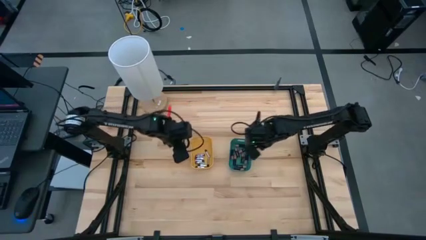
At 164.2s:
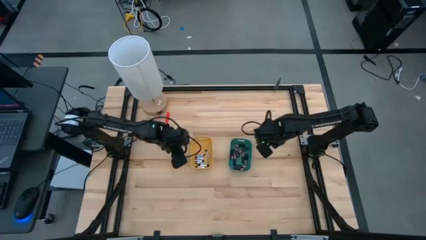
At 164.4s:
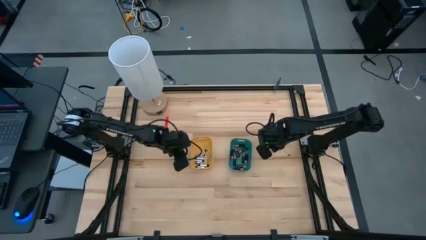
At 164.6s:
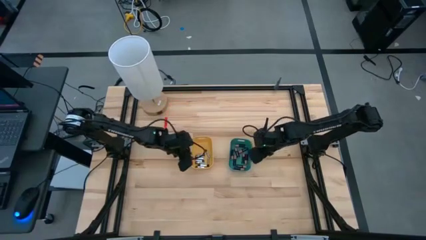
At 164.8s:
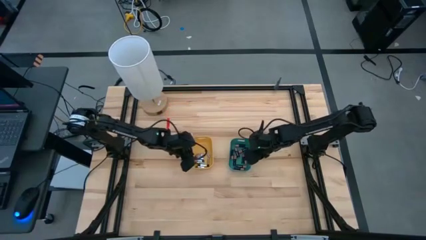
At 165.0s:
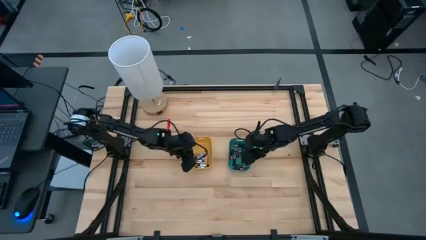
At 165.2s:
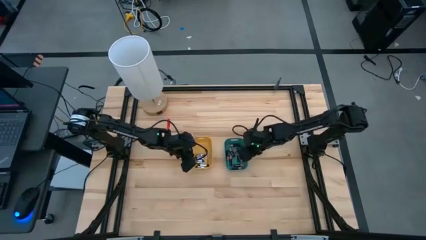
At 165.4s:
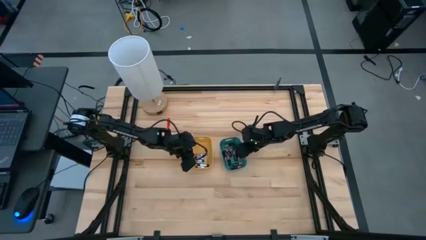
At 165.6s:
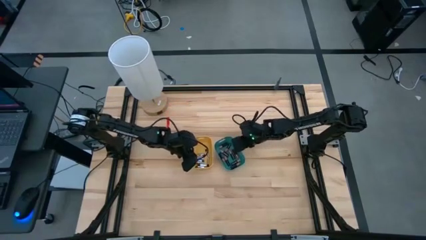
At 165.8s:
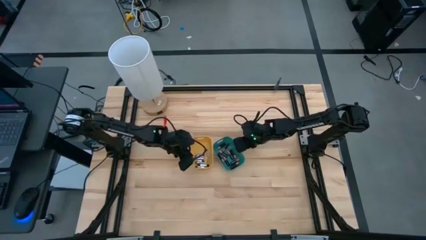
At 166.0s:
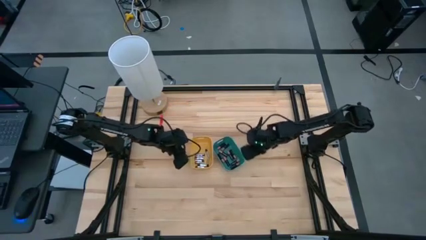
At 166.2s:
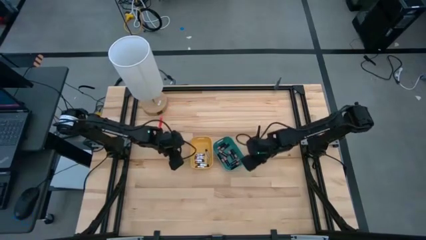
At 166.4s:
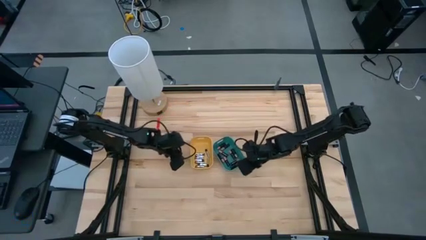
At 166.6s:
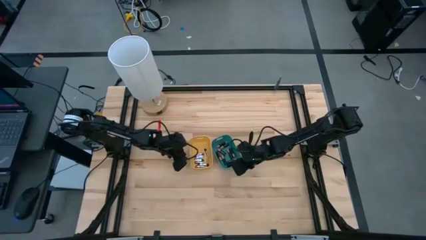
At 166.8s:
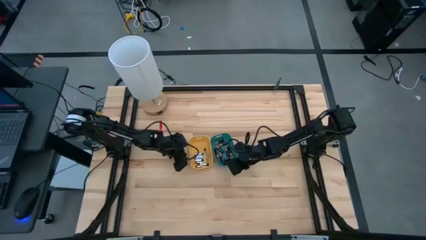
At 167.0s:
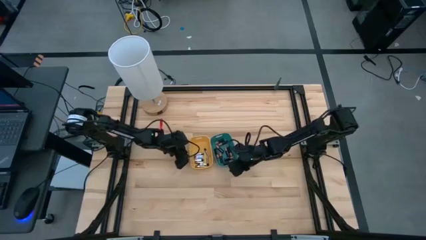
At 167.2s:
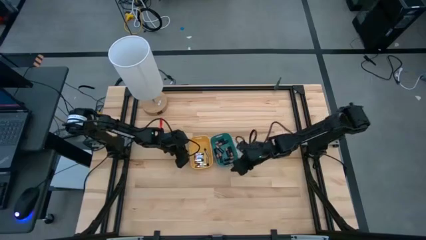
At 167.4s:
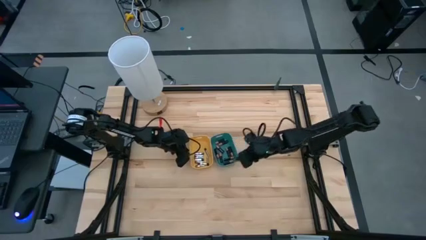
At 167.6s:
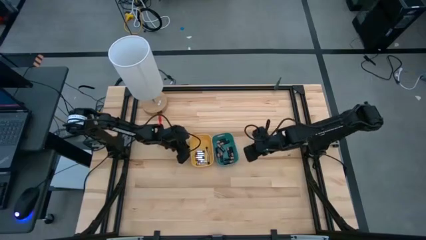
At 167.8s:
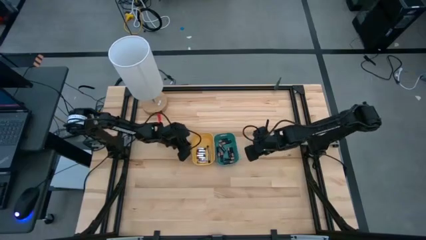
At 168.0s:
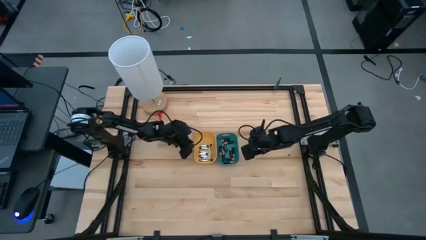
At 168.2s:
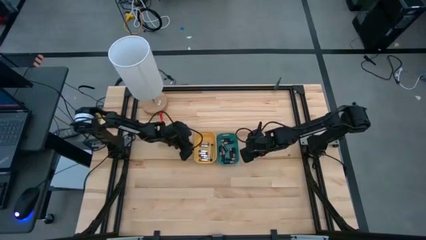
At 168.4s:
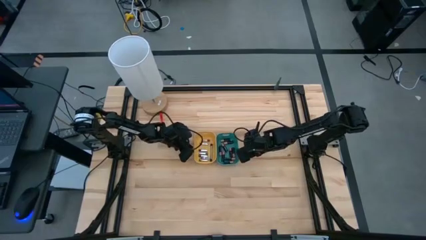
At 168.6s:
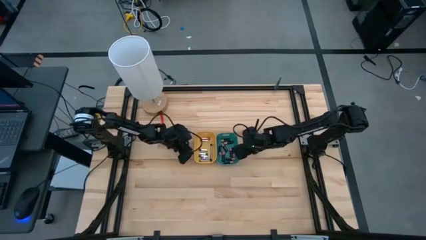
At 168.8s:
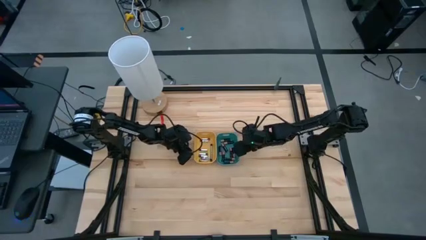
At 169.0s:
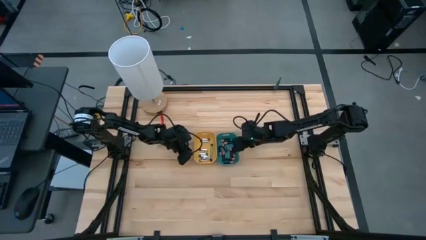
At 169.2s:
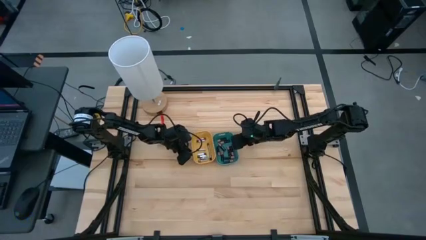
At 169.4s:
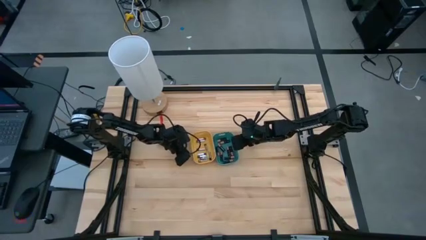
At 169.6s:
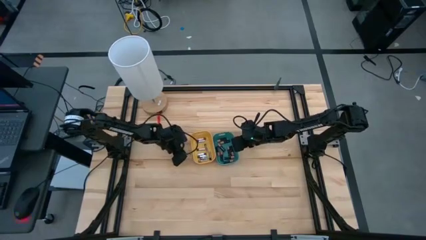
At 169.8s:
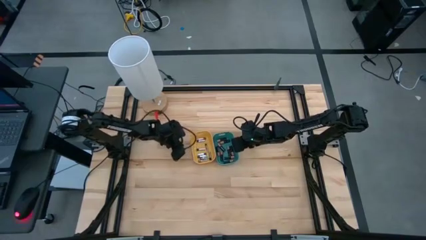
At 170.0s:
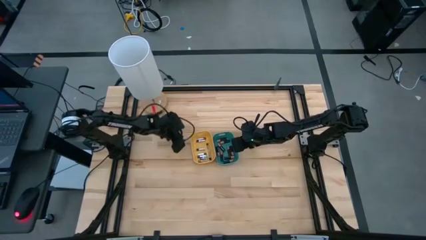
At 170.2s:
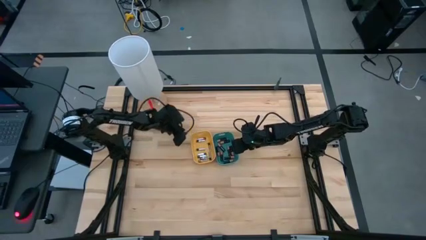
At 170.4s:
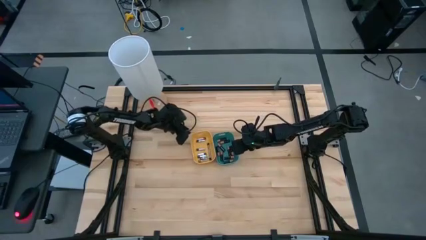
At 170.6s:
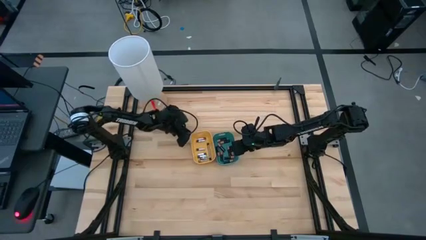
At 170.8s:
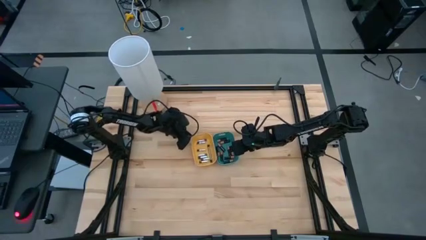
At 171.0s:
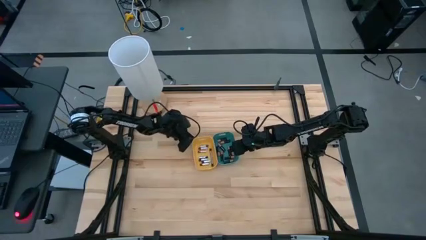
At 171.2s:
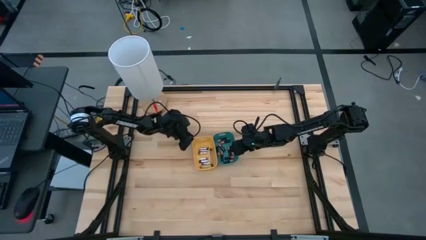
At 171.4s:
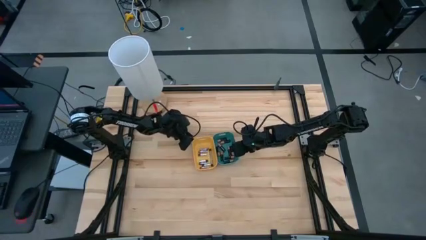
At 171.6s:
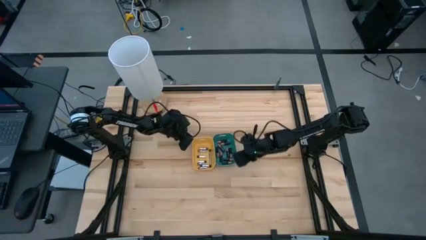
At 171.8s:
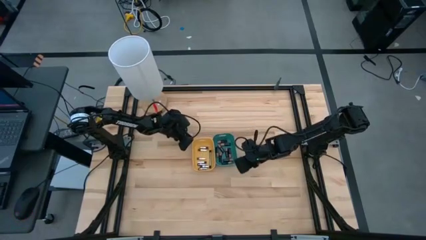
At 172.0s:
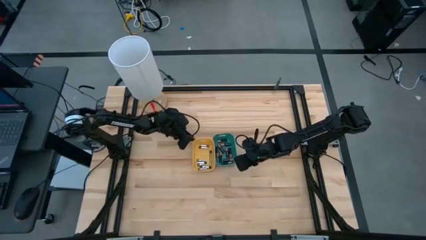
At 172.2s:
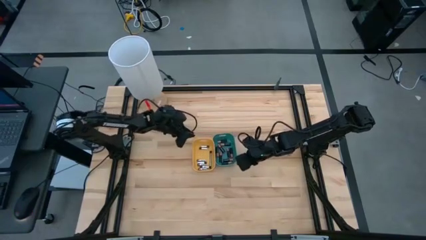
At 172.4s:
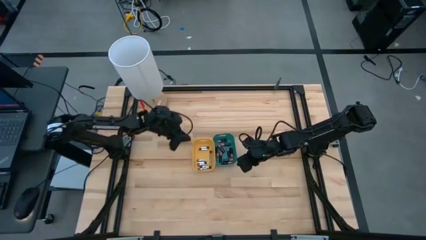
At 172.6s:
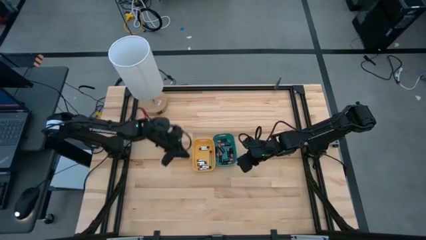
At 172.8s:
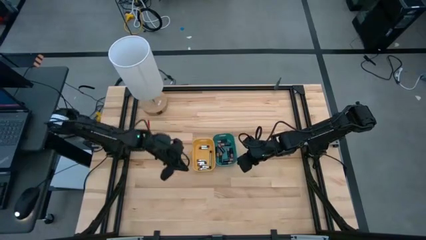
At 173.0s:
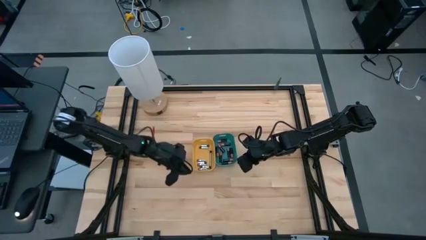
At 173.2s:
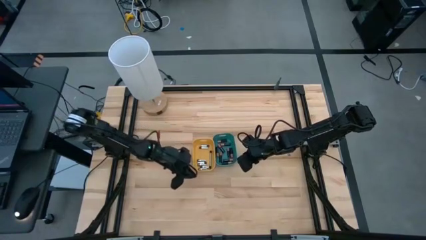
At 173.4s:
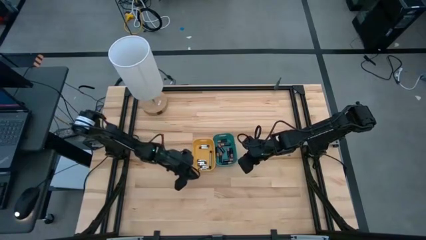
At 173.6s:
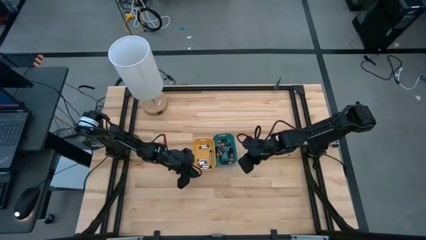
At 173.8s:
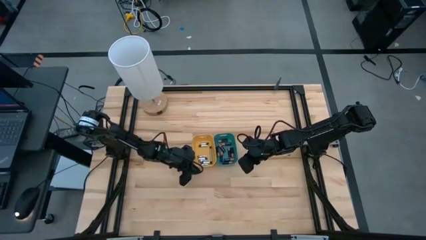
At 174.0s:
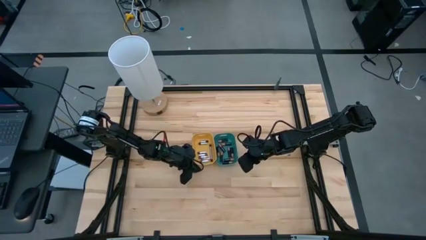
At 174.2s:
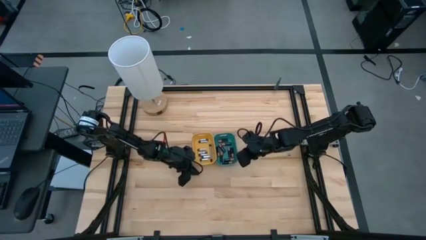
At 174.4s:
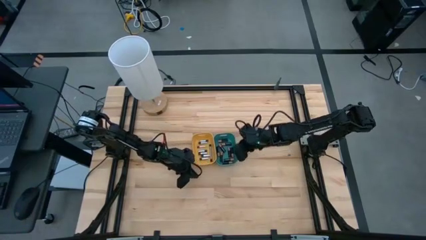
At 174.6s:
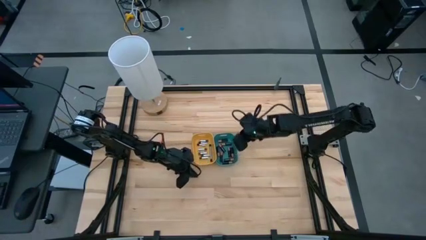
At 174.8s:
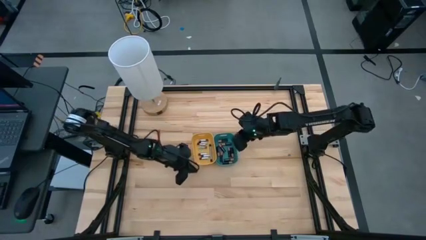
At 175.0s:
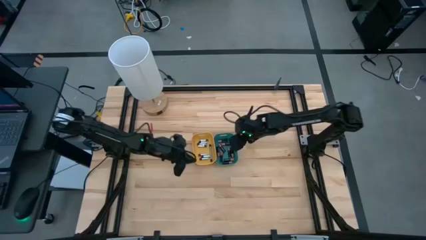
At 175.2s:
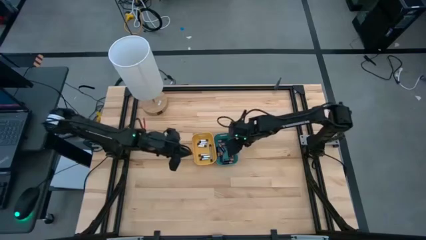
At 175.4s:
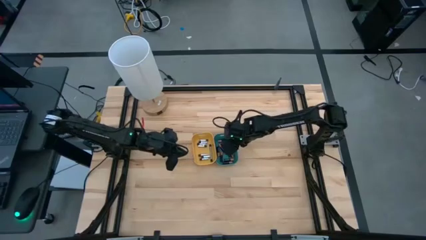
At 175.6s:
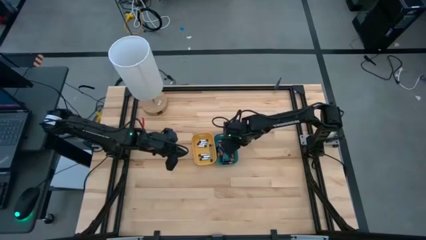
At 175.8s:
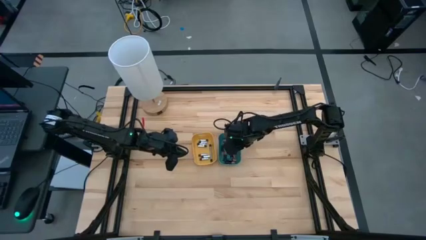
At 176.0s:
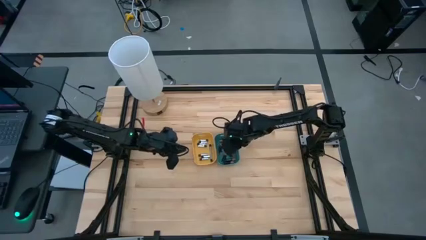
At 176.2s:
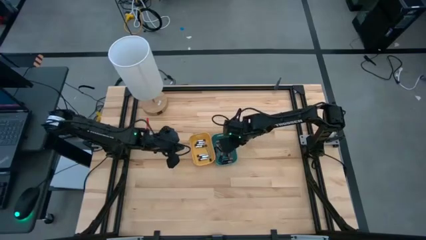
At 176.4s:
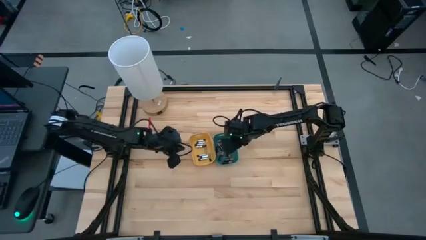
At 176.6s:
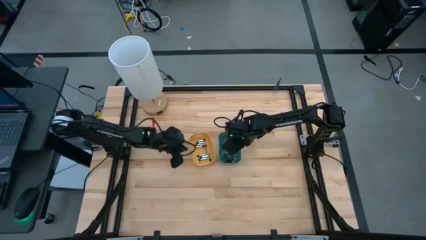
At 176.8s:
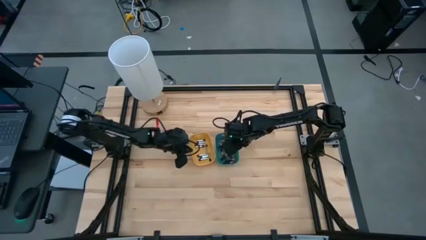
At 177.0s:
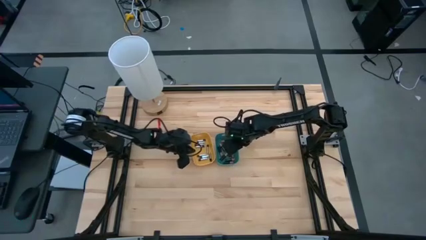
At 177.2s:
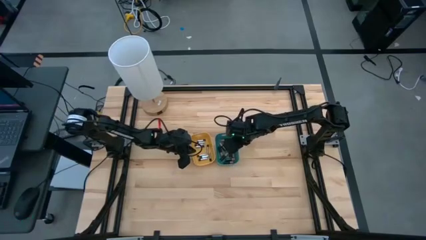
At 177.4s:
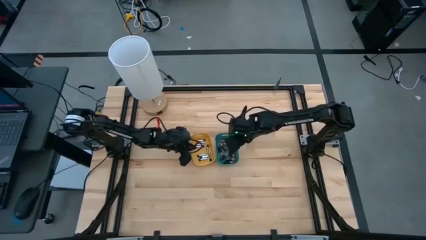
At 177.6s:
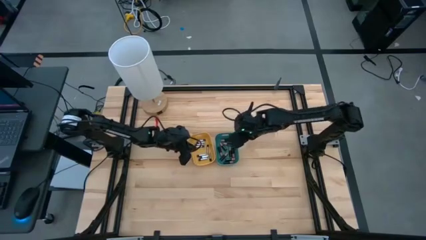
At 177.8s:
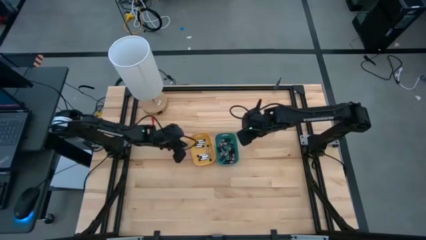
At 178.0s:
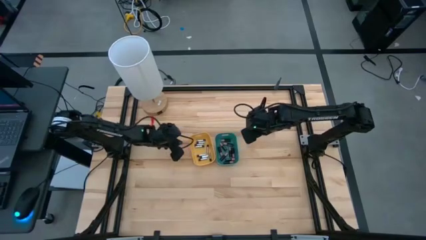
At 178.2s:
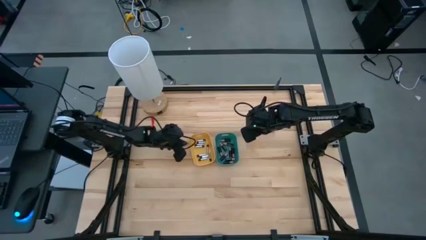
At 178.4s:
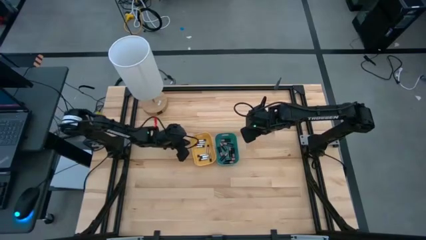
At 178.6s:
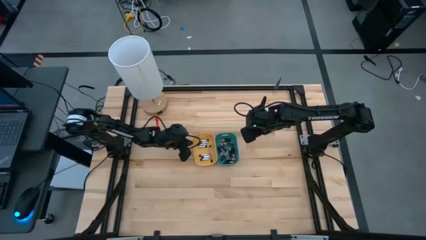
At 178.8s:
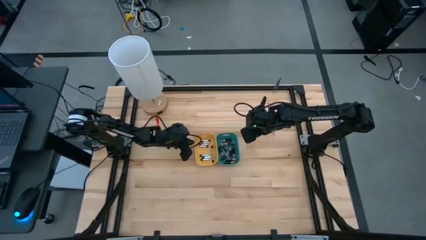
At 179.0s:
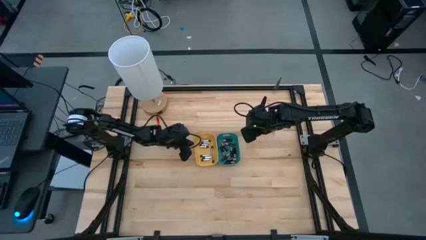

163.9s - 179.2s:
Task: Sort batteries
Adjust the bins

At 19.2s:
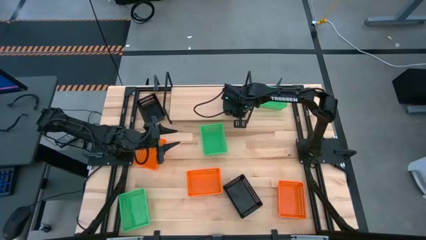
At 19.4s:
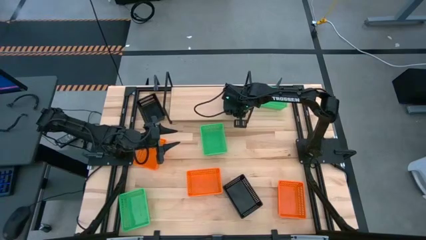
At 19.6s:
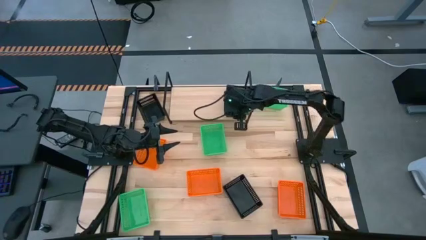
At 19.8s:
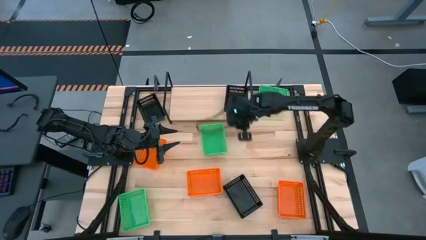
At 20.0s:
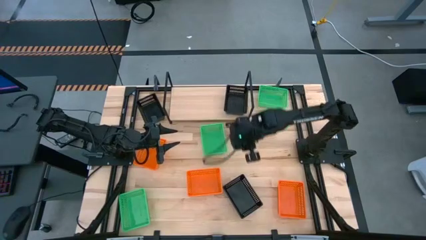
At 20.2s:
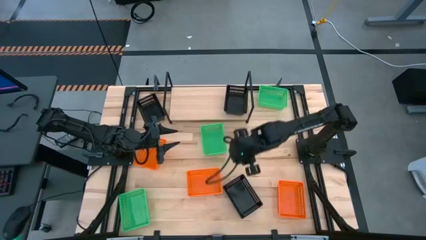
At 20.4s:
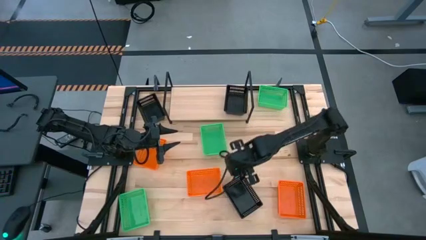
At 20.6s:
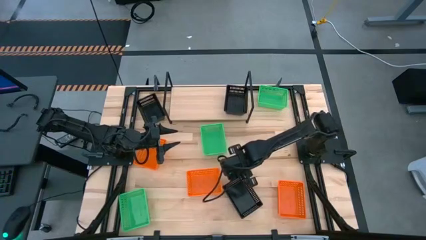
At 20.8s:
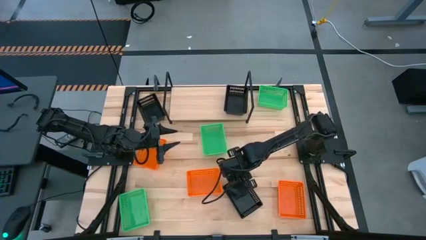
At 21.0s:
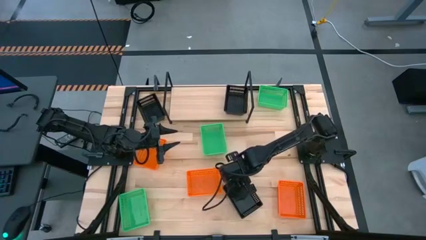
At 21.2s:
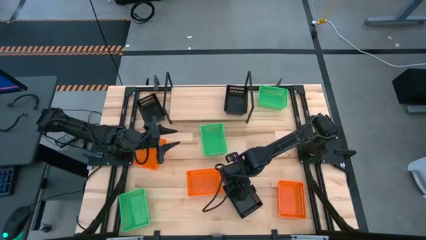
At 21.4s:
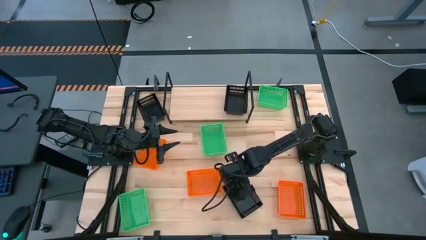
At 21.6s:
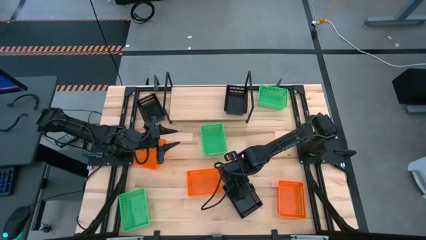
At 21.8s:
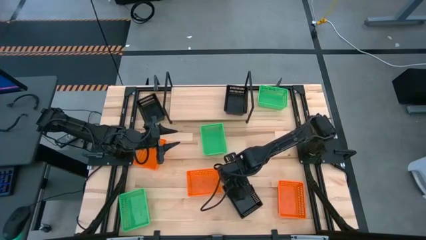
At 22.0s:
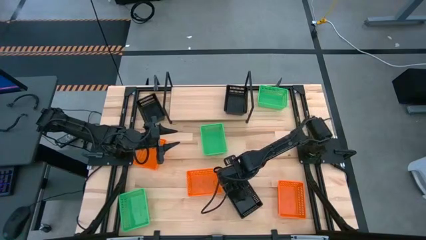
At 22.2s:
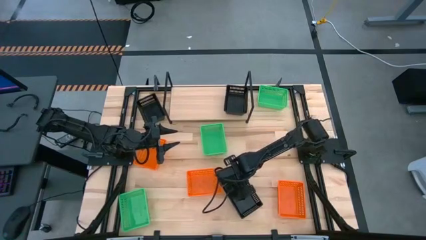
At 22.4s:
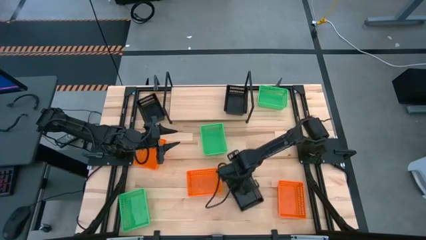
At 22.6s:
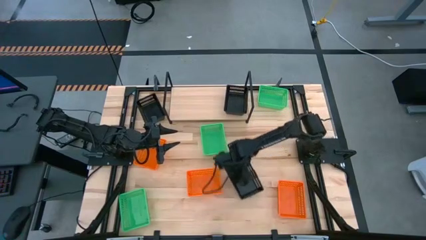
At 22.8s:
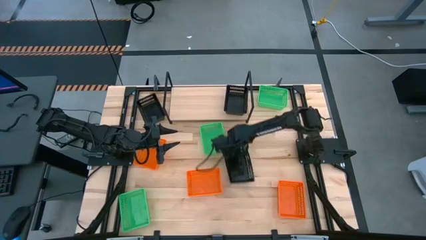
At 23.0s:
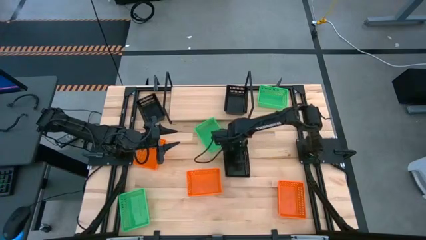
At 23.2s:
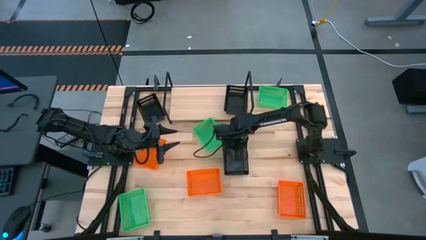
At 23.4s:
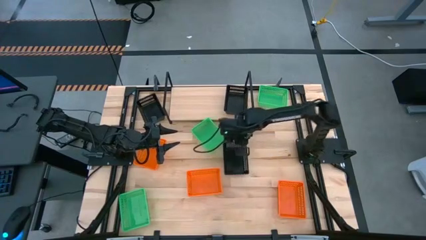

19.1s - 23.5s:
Task: Stack baskets on shelf by color
Stack the bottom black bin on top of the black bin on the shelf
